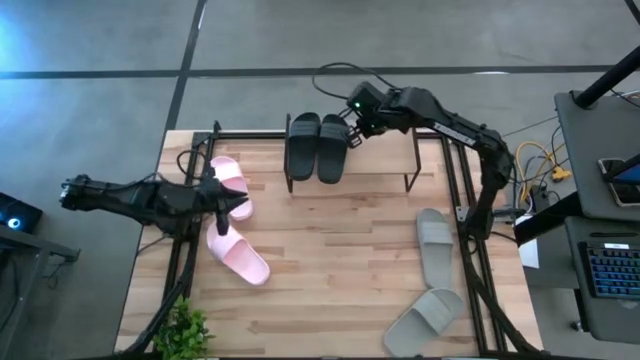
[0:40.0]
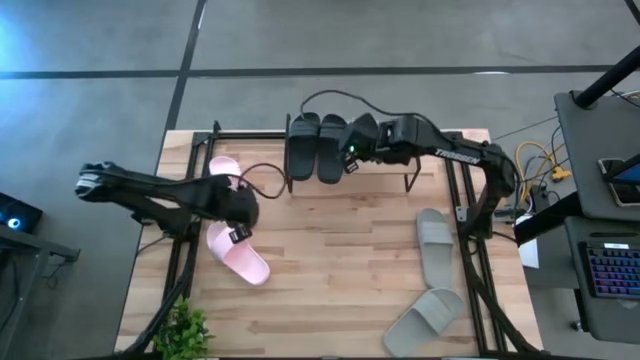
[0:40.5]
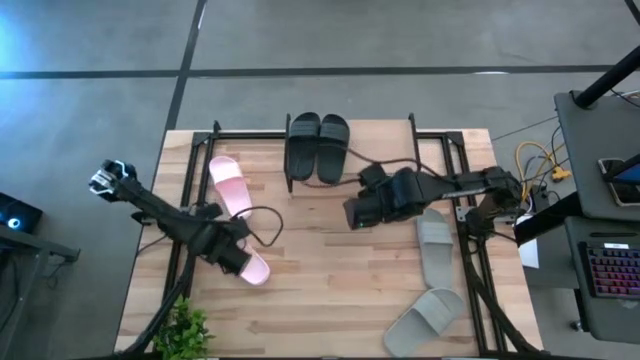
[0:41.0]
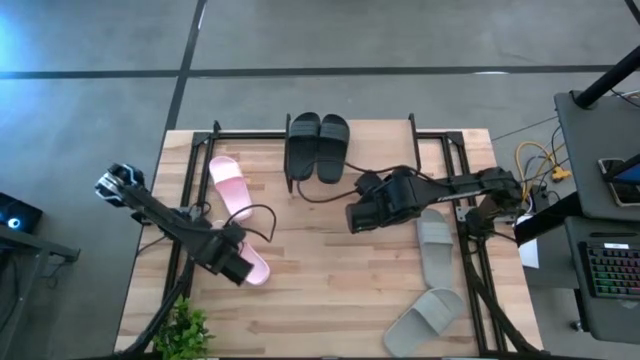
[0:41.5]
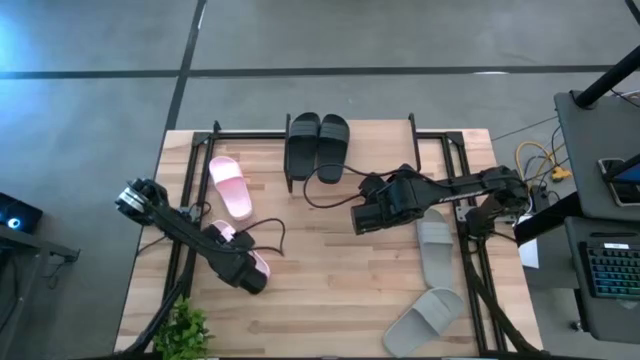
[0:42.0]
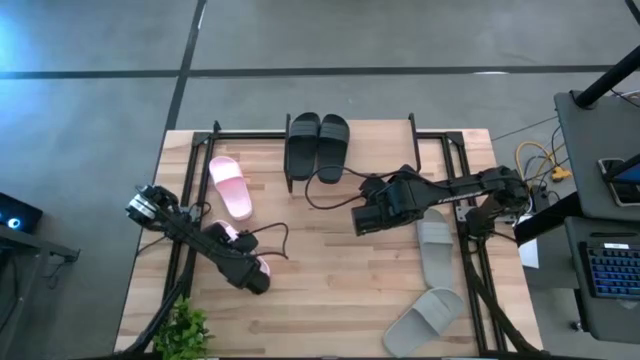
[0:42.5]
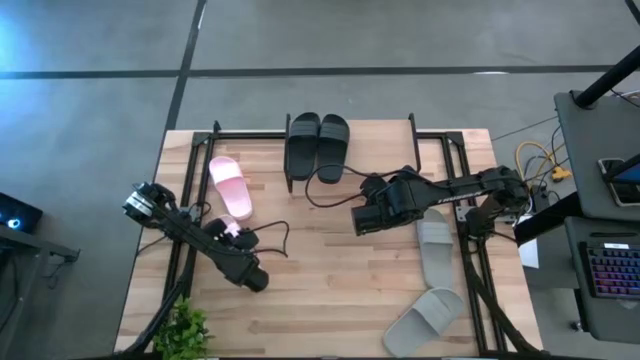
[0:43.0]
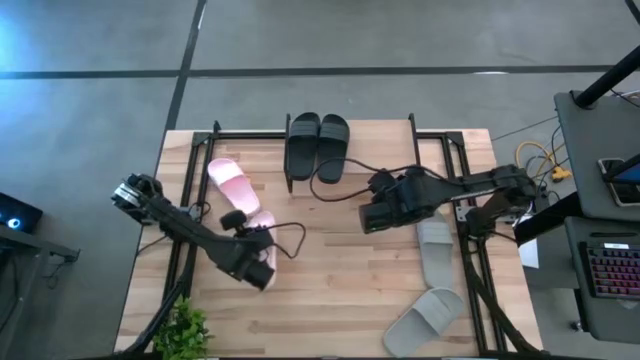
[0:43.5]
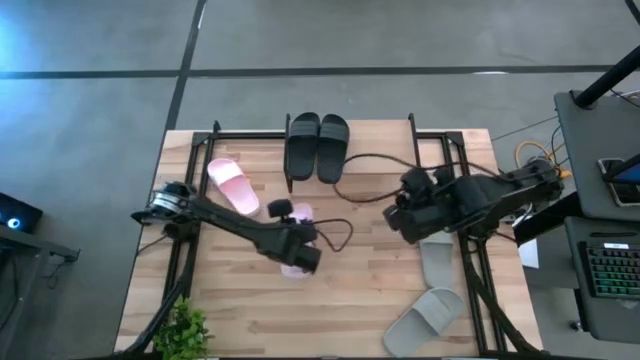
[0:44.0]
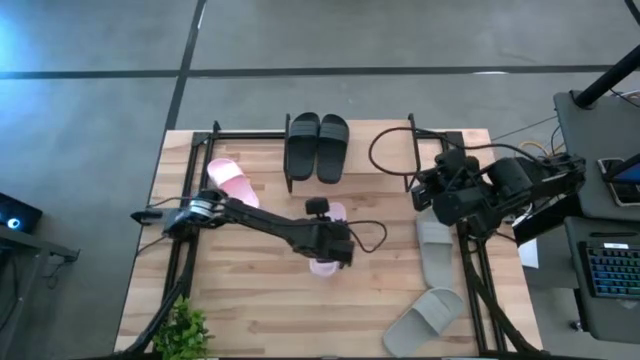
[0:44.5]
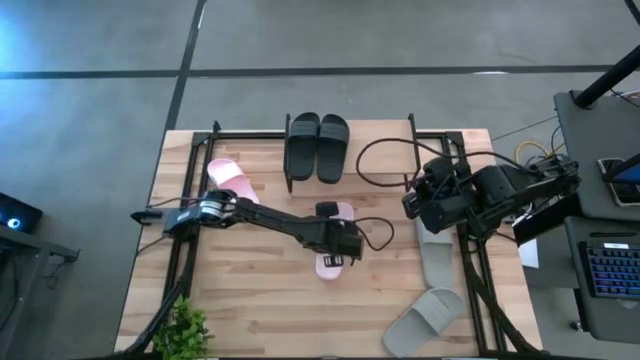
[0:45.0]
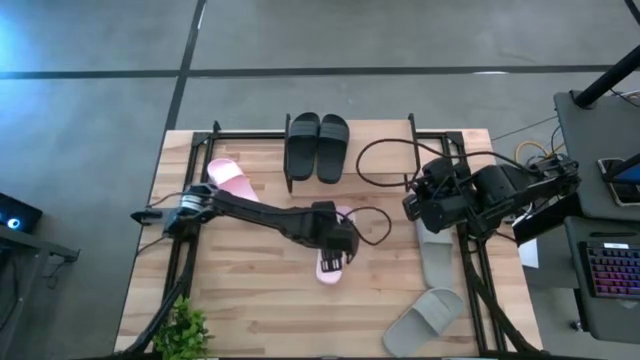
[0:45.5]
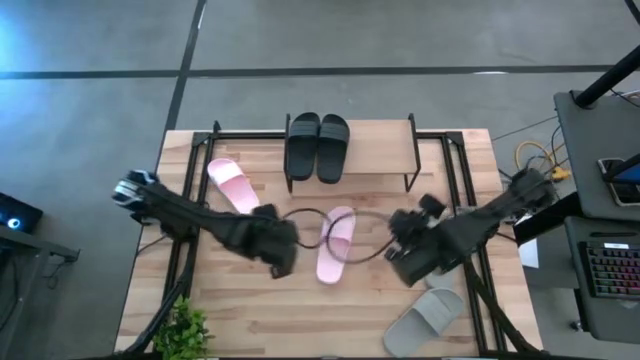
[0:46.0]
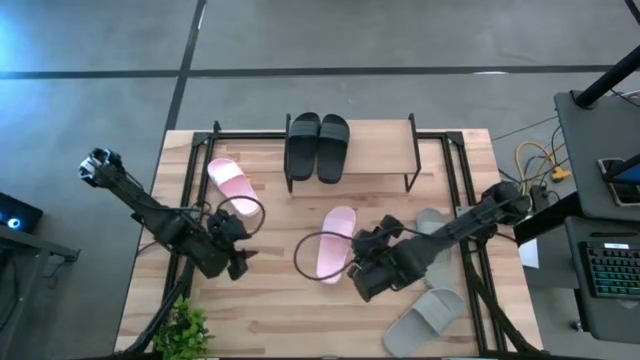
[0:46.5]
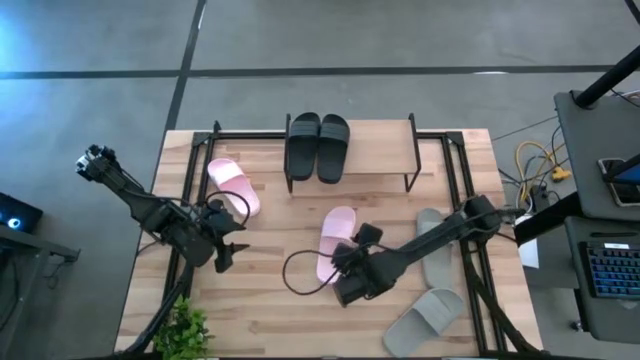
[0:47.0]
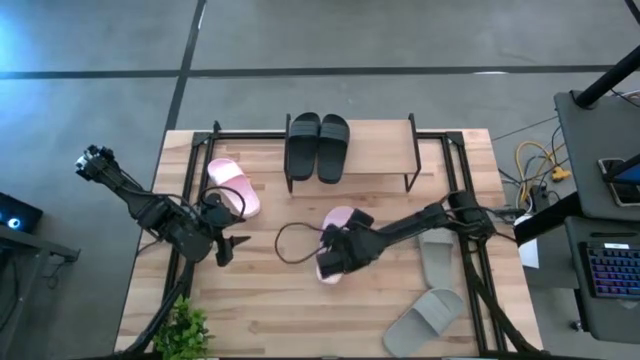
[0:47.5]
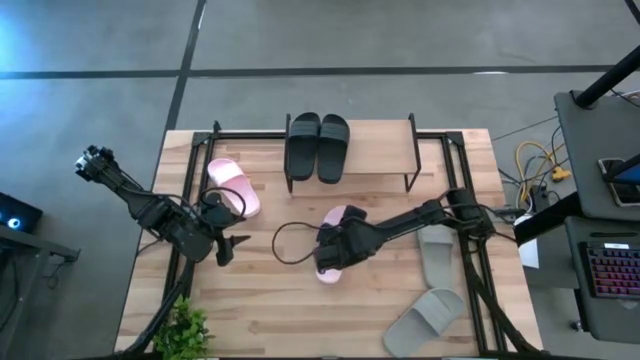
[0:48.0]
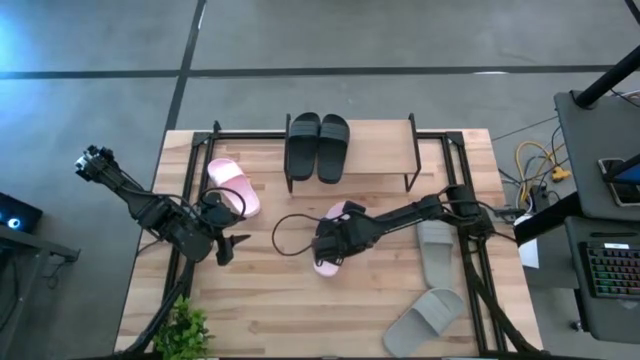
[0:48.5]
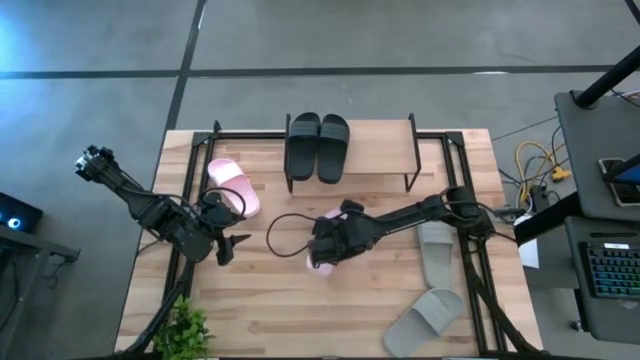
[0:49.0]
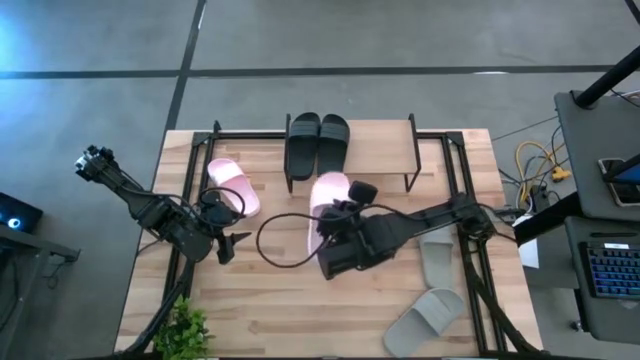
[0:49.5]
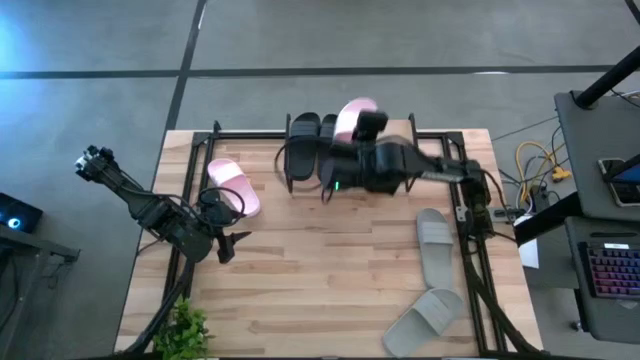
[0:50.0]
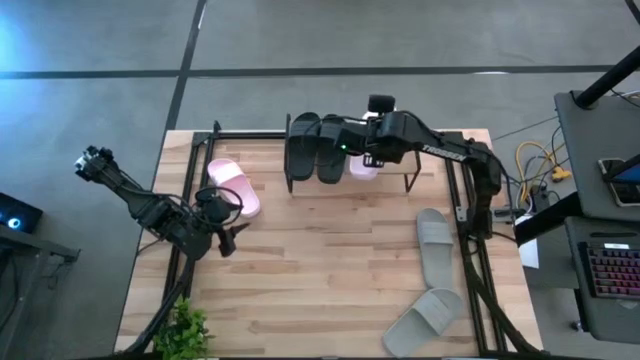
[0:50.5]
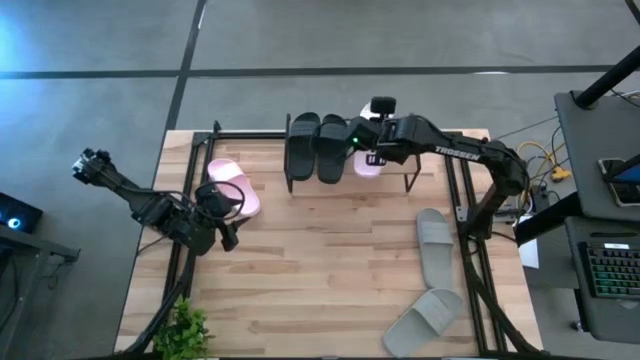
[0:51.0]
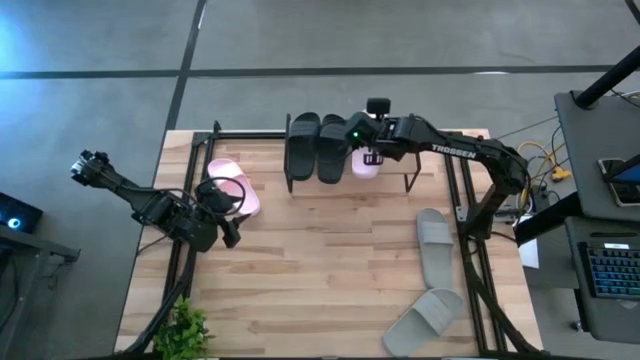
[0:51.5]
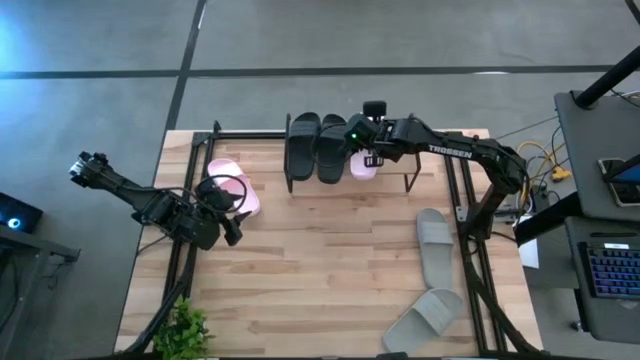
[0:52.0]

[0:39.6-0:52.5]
Task: Pick and place slides into the shelf
Put the bottom pink slide on the shelf

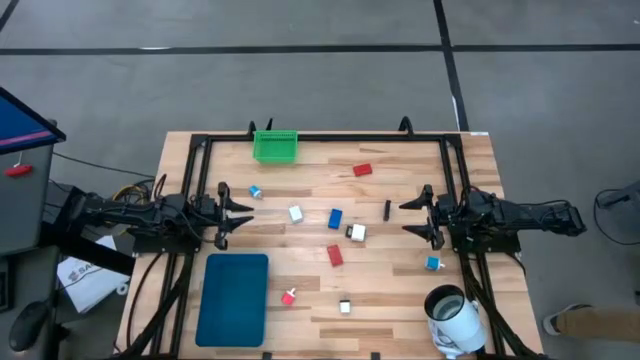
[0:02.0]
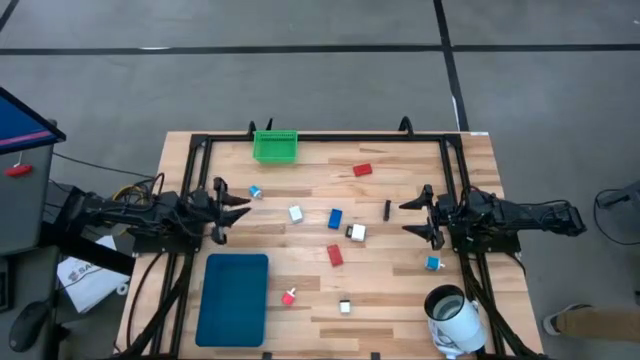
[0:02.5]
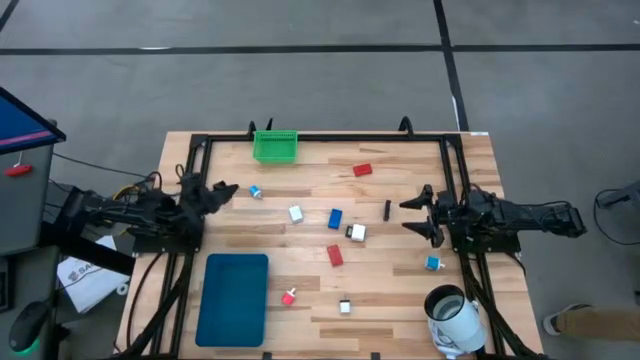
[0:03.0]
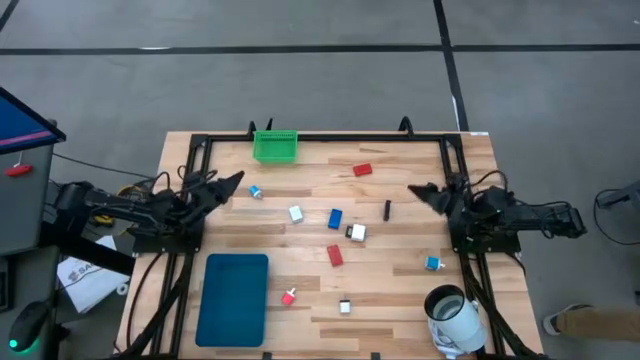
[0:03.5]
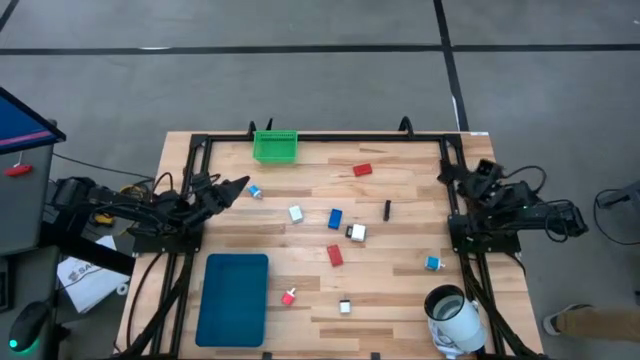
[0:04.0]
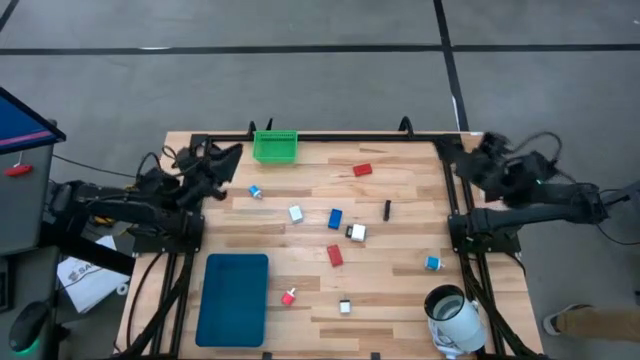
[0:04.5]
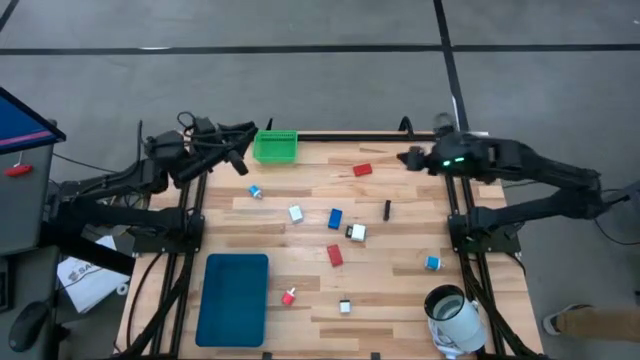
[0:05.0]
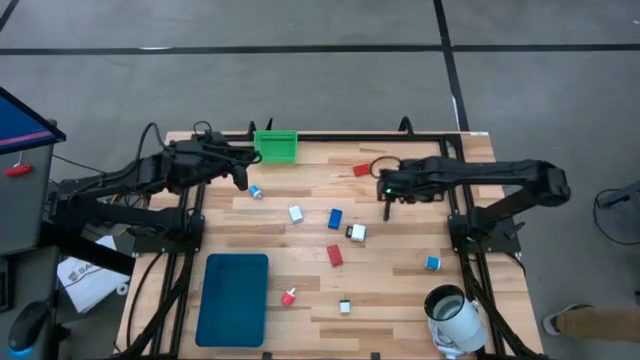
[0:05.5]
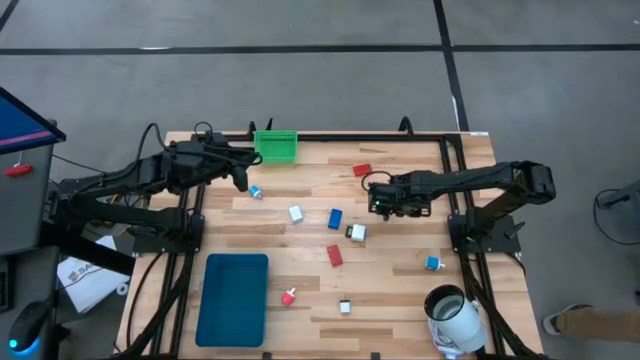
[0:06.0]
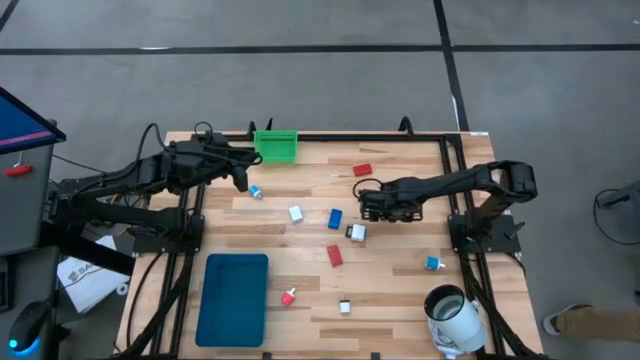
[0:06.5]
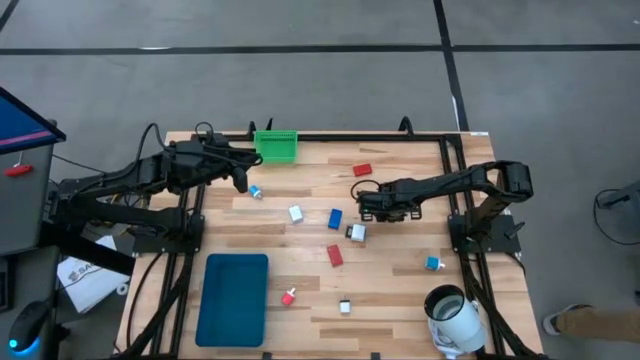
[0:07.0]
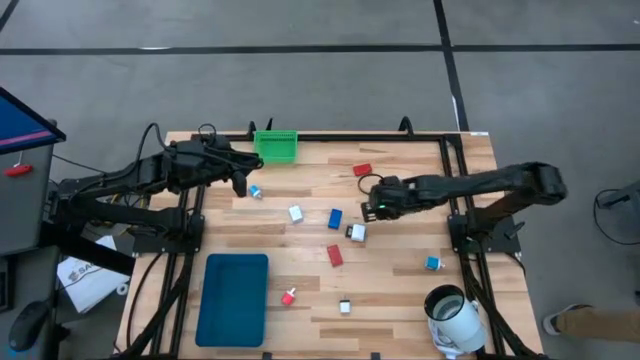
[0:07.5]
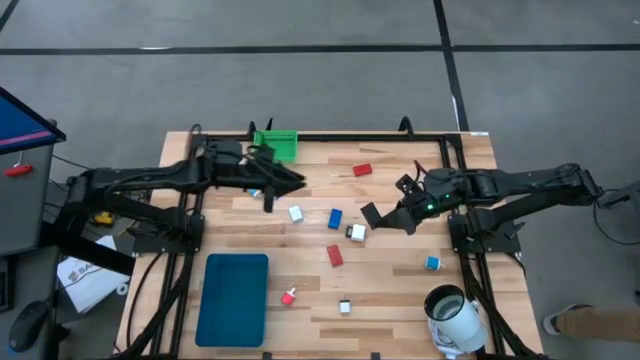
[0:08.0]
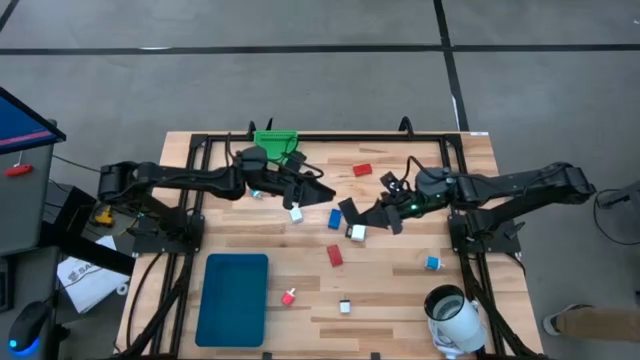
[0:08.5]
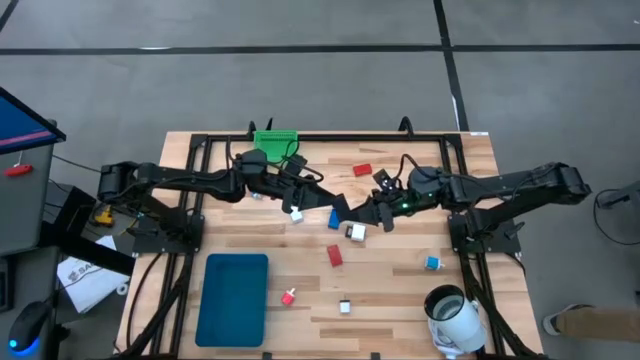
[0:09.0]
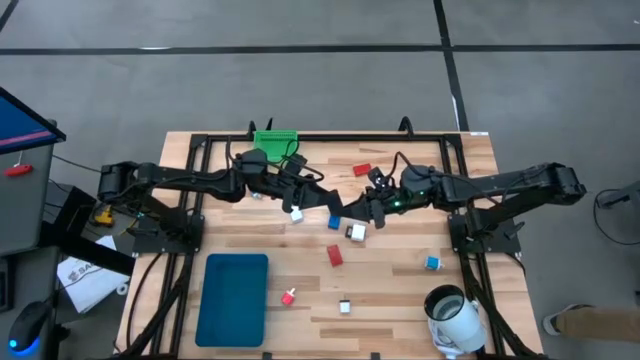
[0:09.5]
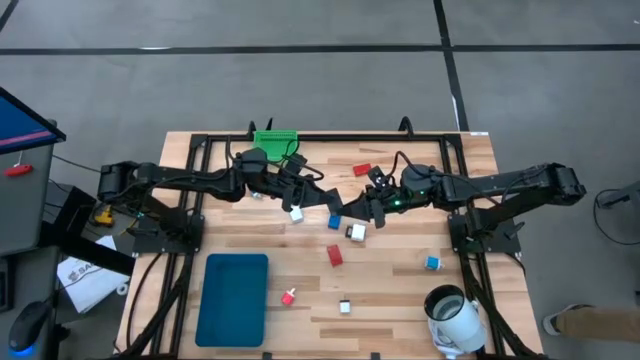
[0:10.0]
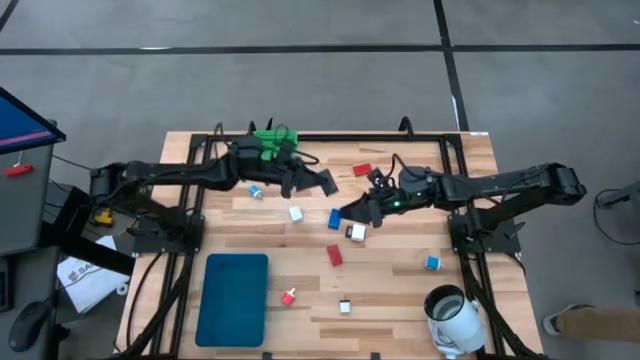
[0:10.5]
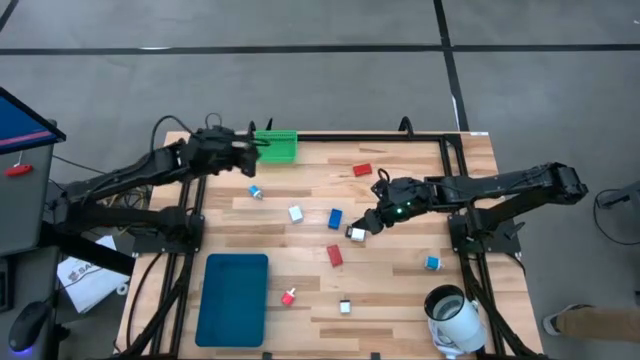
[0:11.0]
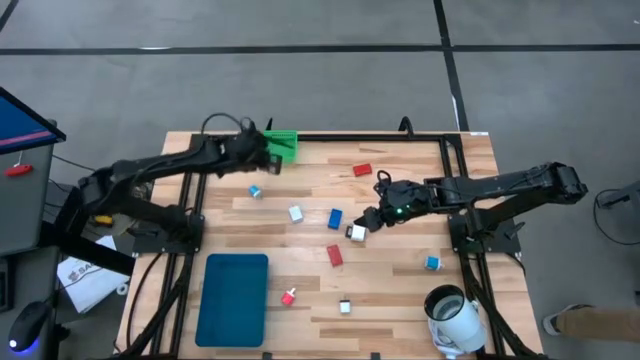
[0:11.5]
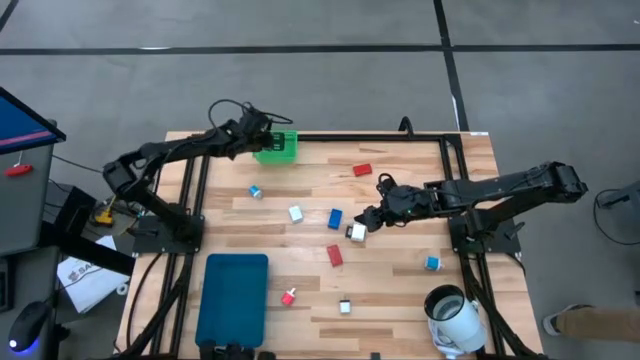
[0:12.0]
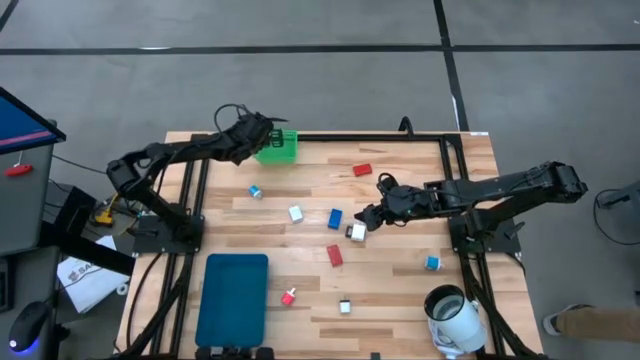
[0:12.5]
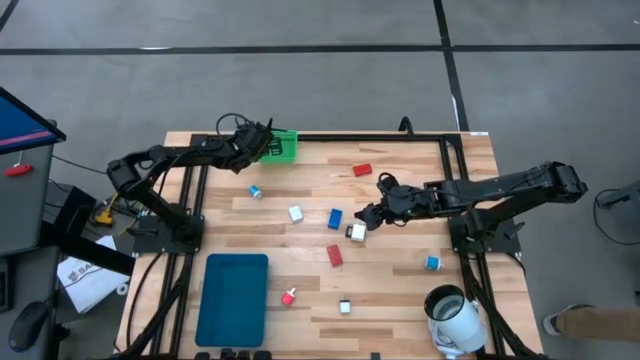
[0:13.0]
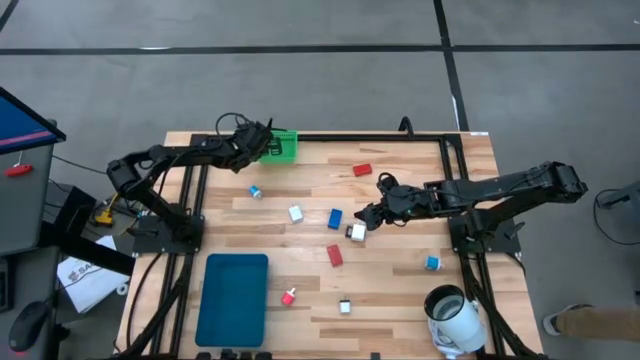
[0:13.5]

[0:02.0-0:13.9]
Task: Pick & Place Office items
Put the top black digital clock into the green bin
